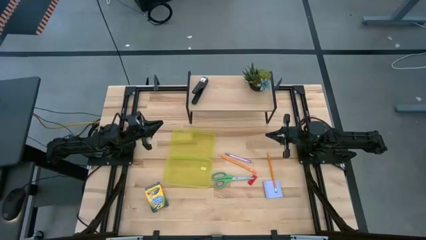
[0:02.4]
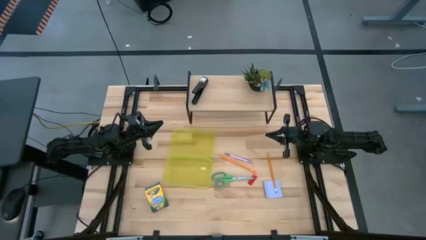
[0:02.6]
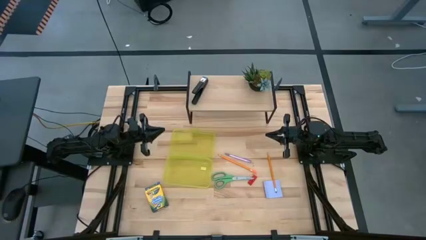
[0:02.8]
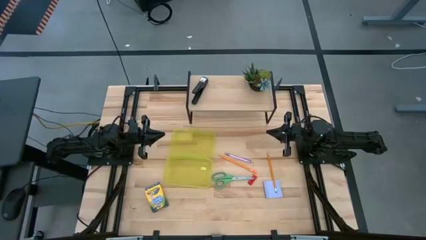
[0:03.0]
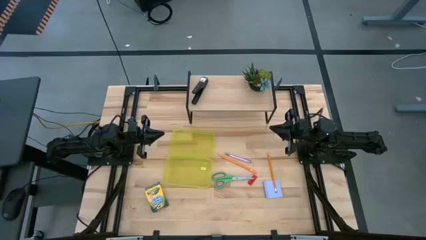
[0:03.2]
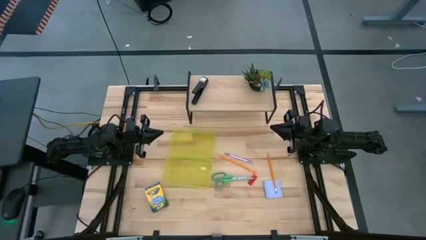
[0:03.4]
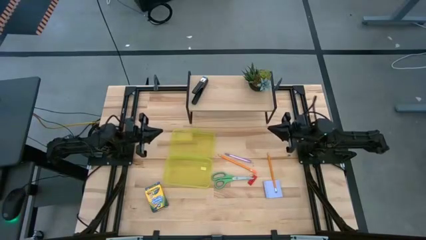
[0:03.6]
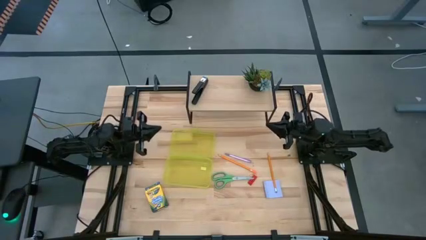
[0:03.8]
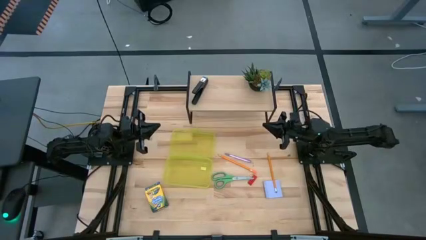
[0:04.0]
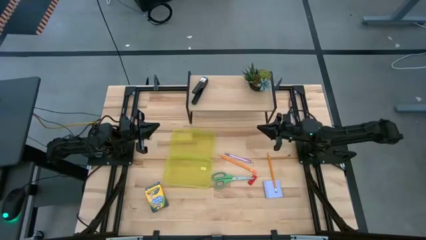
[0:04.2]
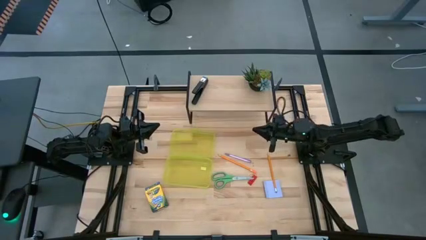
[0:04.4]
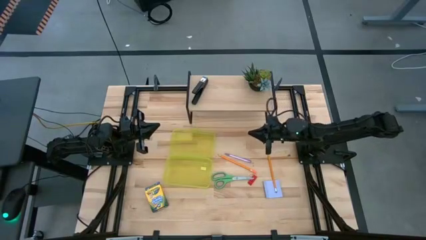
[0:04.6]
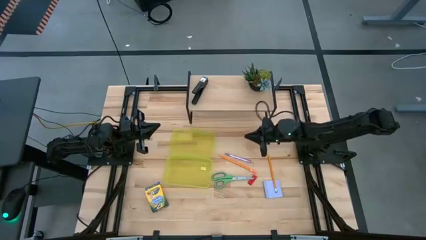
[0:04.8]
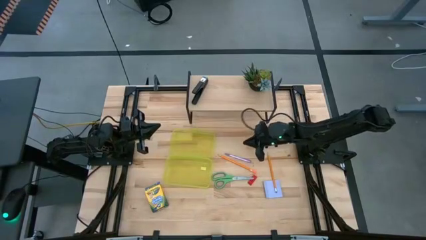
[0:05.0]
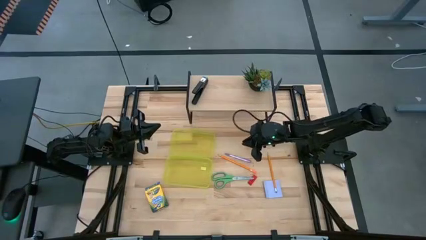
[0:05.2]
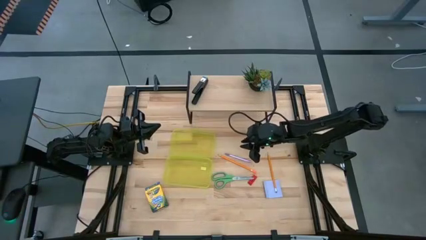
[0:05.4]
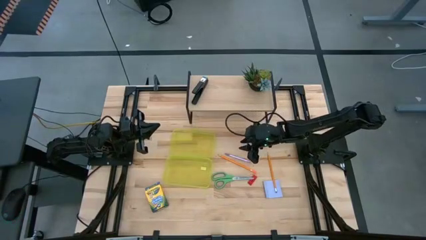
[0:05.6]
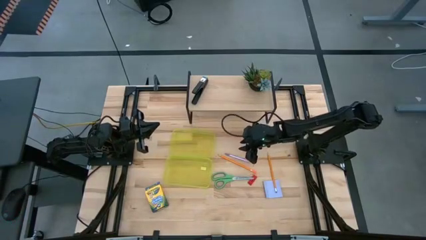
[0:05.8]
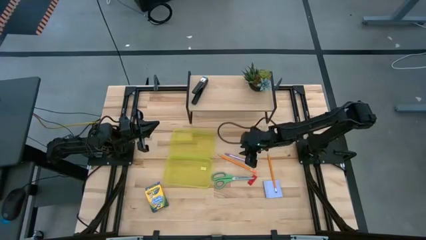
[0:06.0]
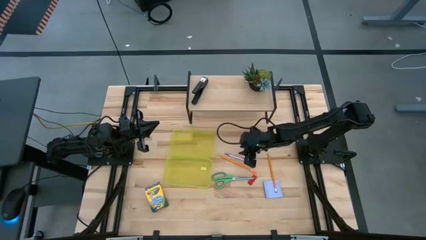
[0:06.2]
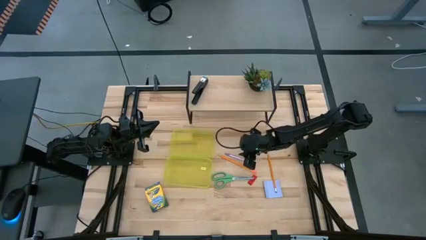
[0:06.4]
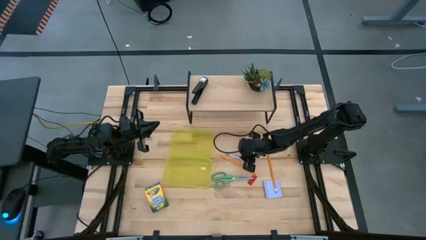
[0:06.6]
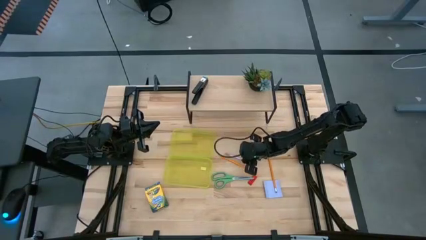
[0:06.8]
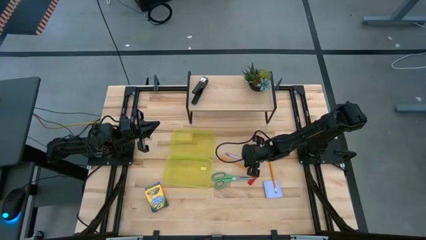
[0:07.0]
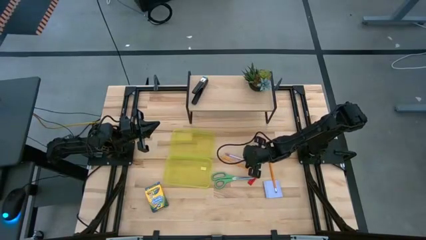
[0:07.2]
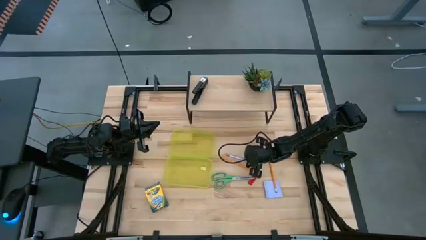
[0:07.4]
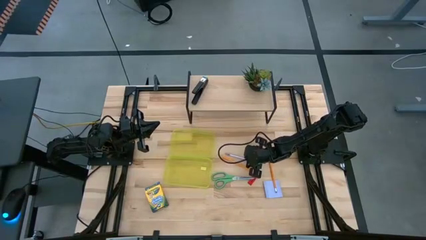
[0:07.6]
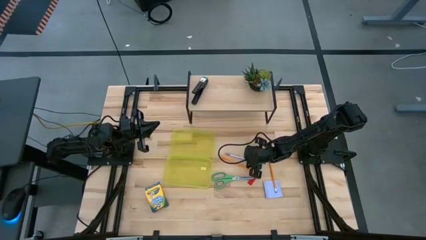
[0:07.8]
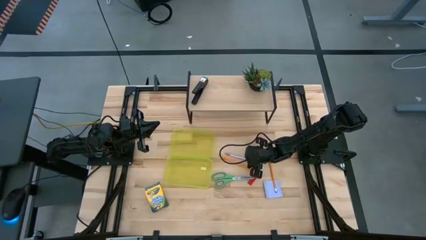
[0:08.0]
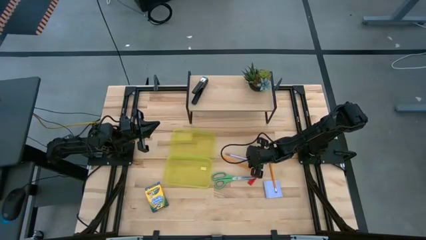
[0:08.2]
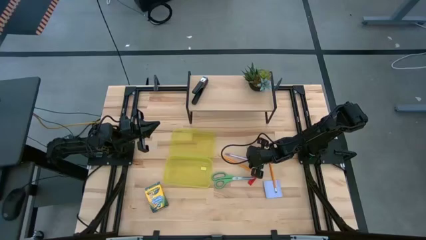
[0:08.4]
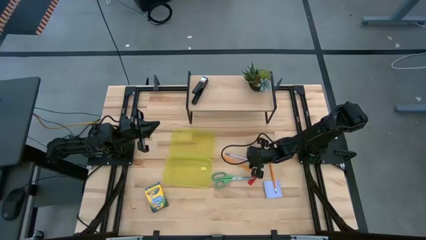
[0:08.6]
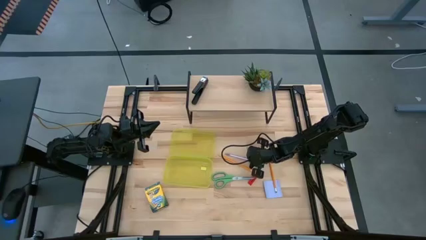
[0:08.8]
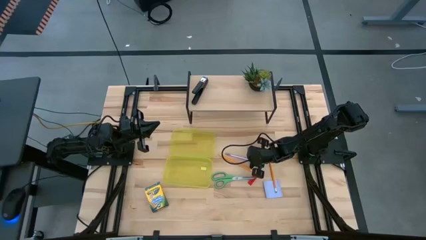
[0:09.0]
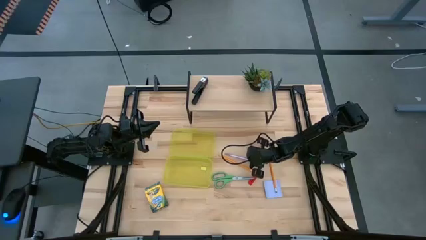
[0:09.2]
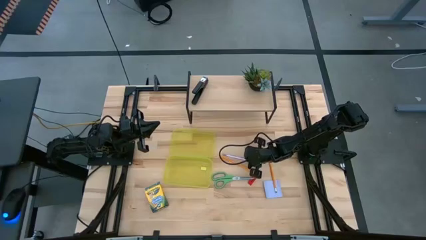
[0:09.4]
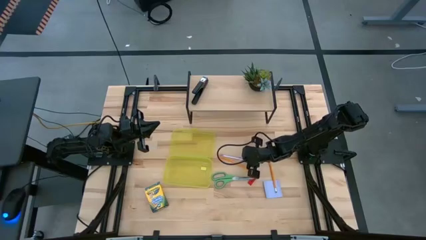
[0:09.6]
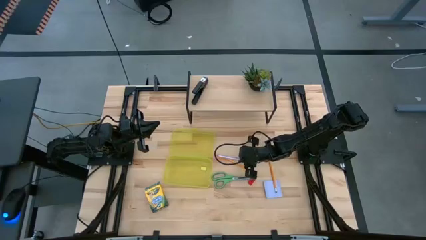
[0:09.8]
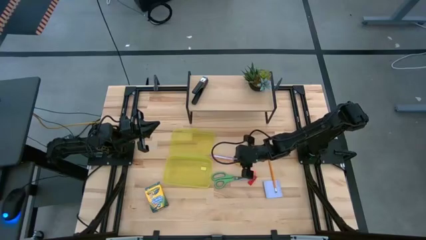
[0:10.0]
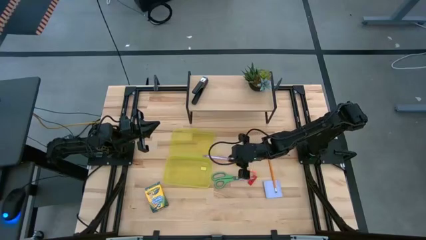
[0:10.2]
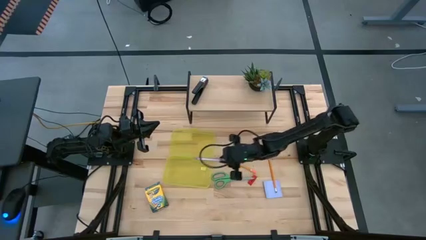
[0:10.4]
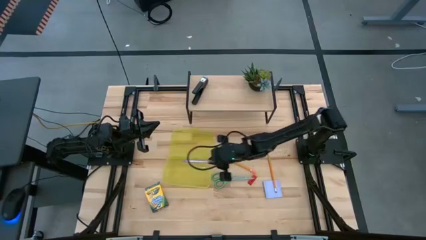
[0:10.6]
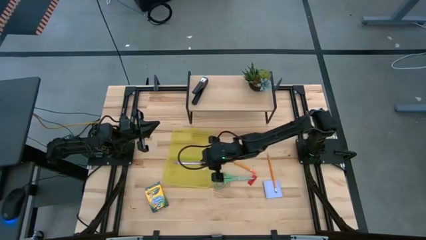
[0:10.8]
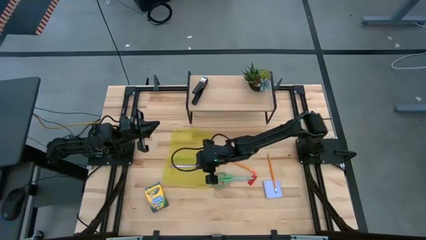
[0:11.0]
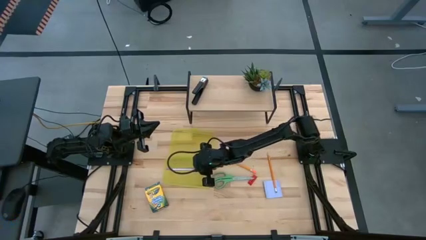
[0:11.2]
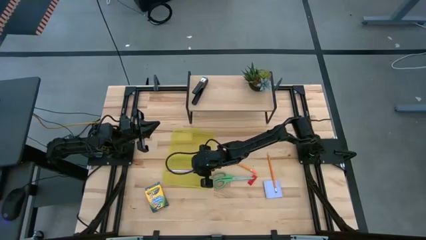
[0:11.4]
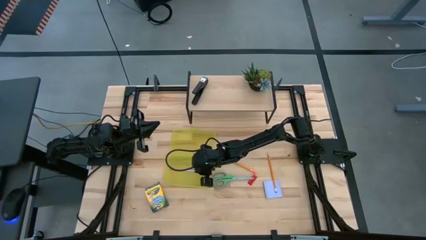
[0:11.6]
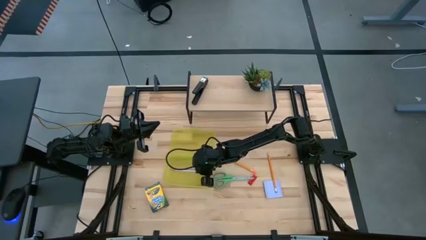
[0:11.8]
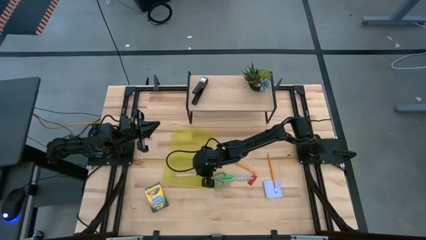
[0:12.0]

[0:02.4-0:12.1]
Task: Pack school essentials
Put the pink pen into the supply box

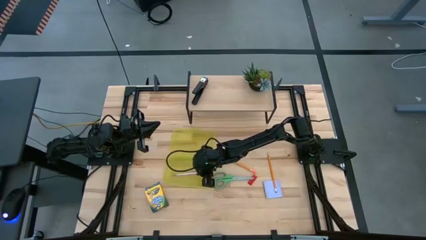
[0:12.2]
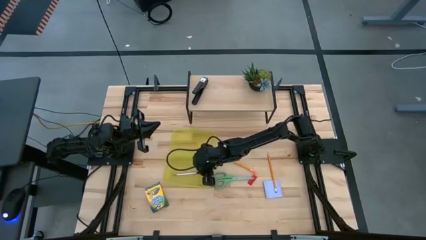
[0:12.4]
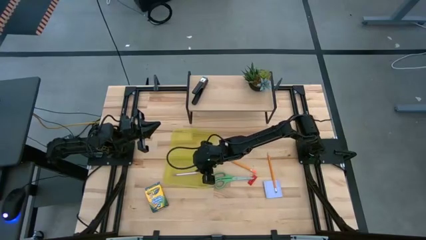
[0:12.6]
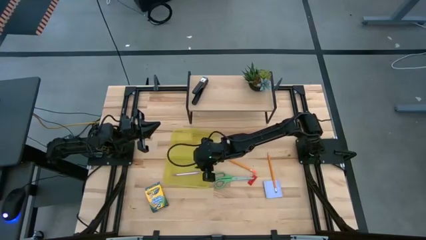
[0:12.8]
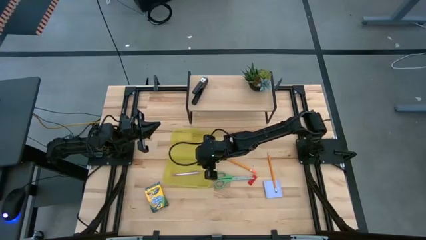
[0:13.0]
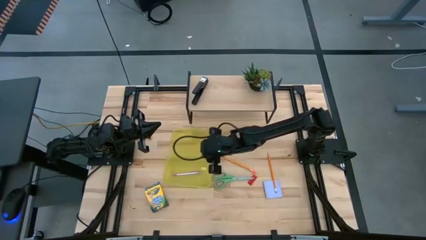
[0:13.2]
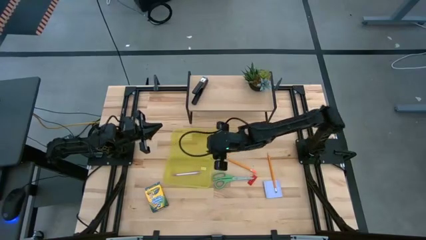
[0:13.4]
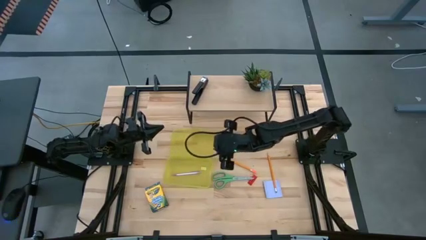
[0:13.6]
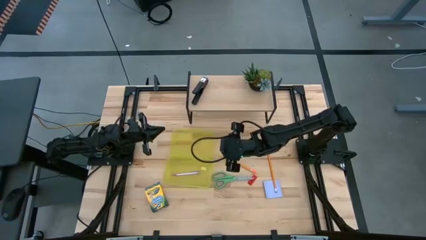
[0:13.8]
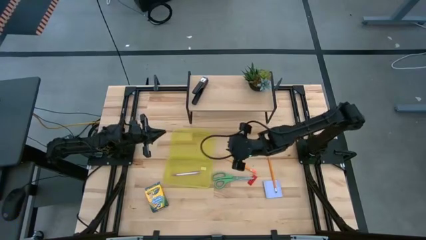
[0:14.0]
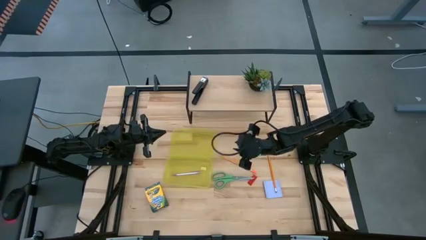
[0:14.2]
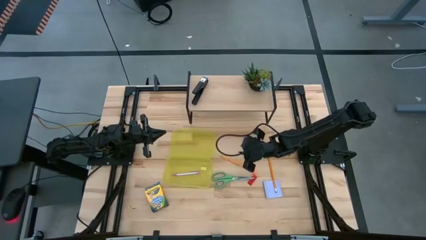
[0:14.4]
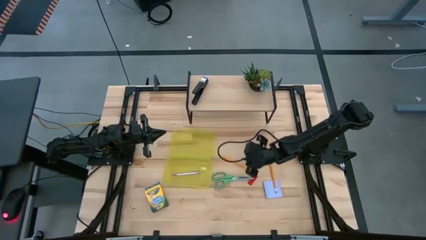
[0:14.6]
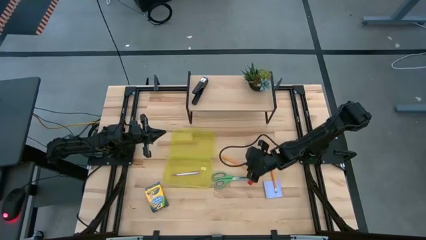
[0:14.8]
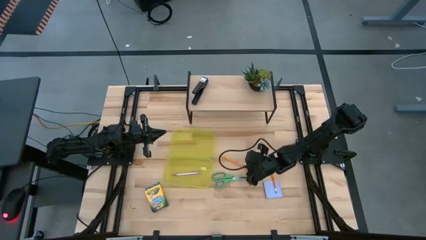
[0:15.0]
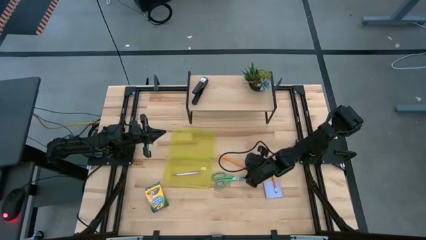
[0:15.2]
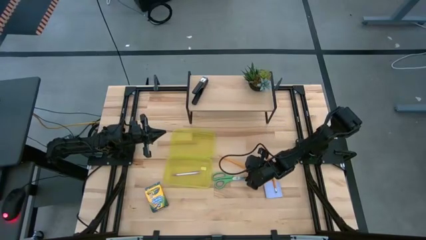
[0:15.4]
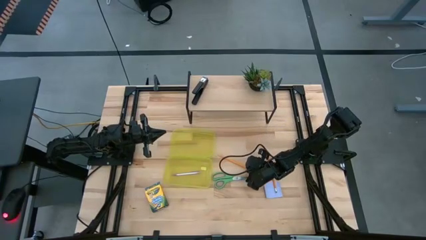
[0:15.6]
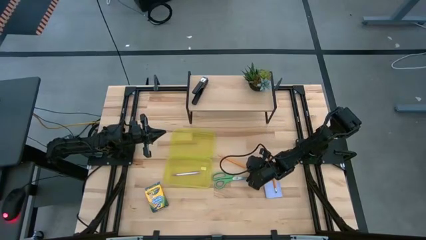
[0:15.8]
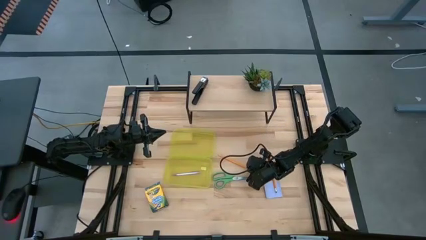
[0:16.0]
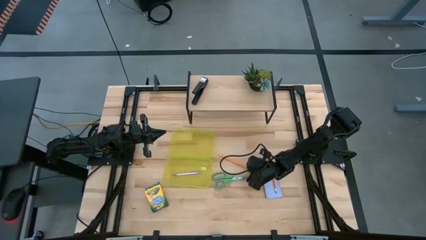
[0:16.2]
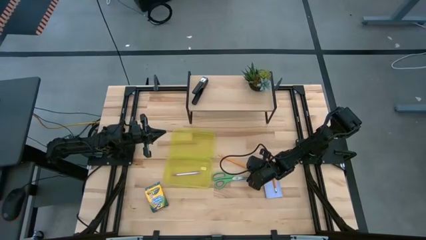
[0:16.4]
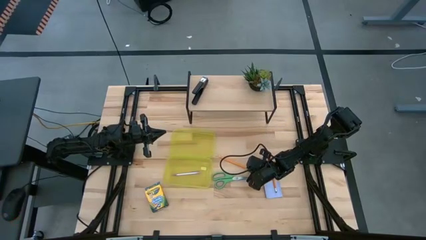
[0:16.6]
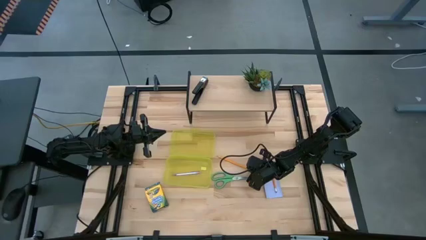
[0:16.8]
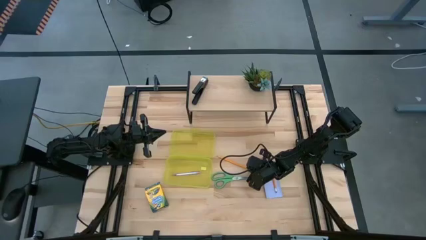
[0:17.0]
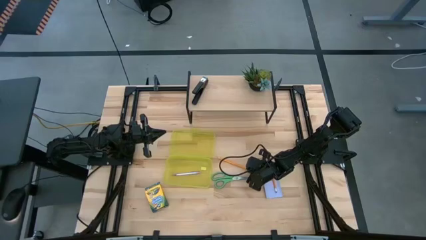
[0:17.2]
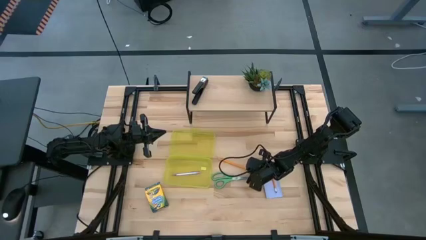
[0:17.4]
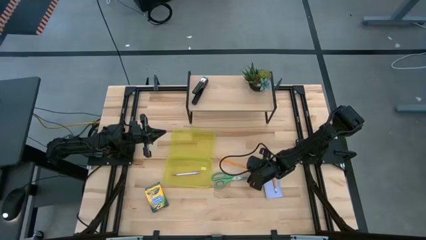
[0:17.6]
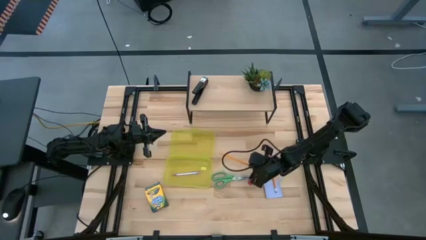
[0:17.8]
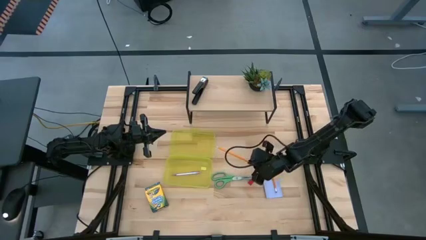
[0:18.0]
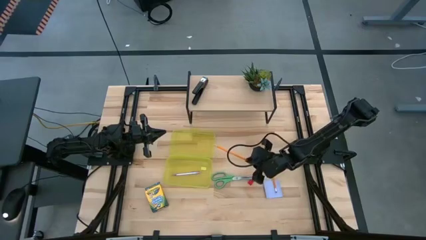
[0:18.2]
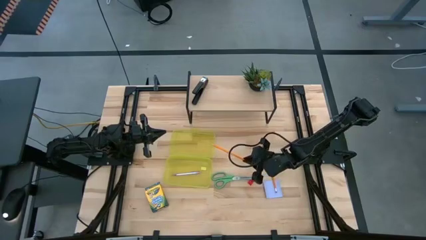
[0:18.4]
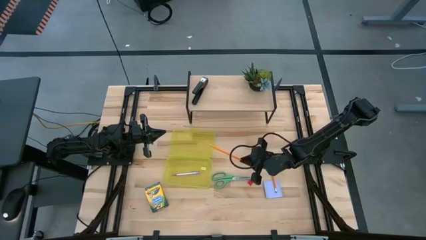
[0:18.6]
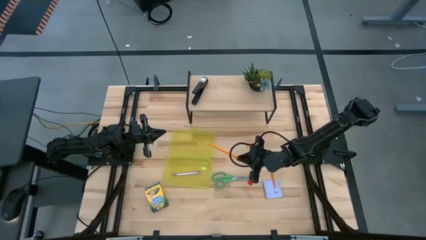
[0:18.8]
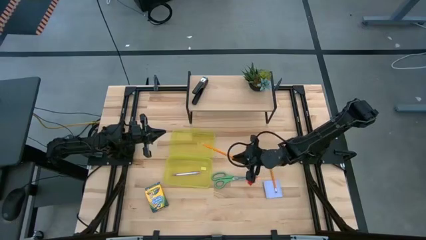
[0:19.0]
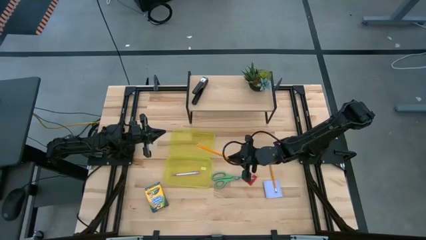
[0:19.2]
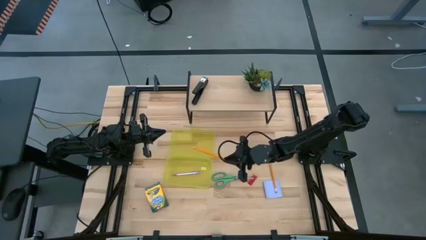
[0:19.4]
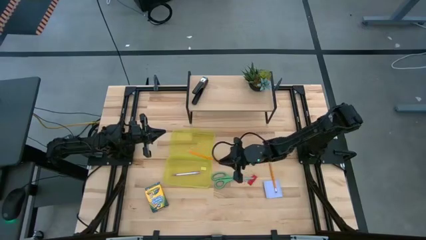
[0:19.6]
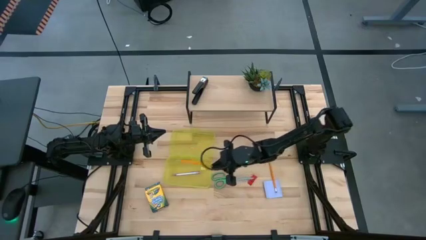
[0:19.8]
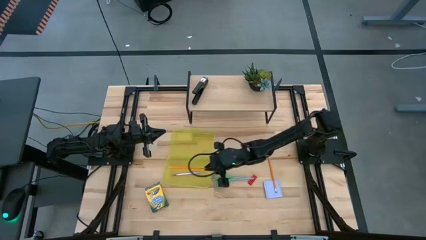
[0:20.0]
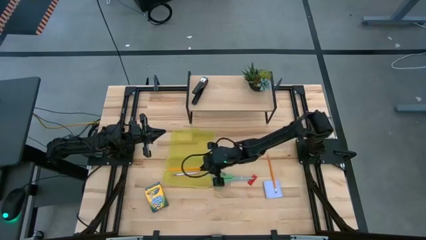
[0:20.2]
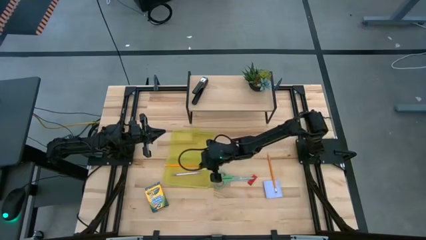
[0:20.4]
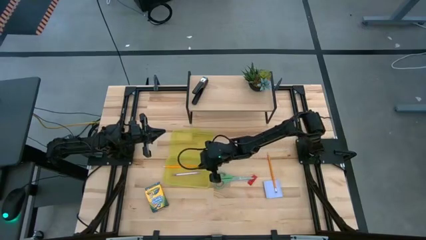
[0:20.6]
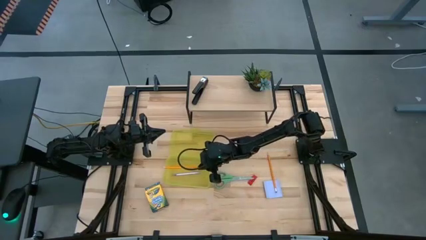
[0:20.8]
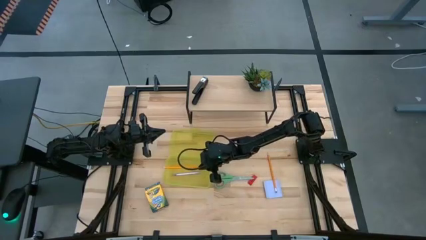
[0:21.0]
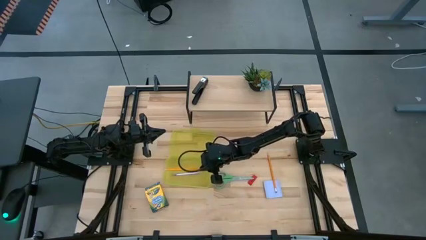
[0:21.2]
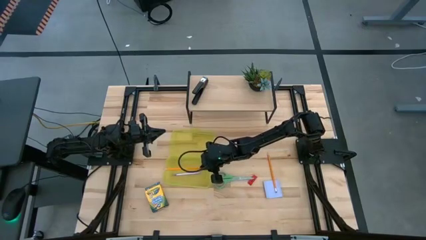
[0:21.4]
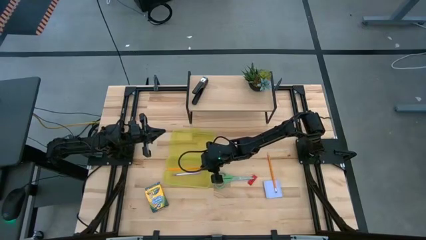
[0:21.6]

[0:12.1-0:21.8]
Put the yellow pencil into the supply box
